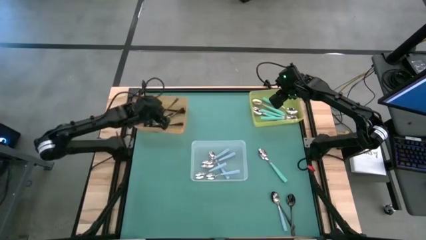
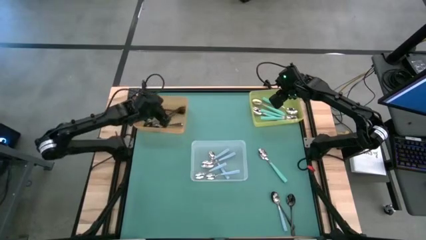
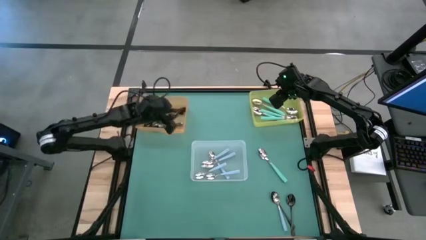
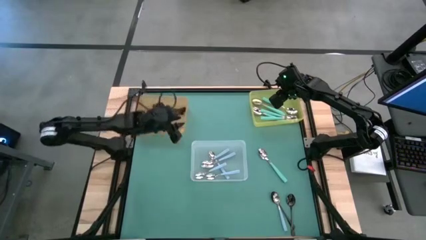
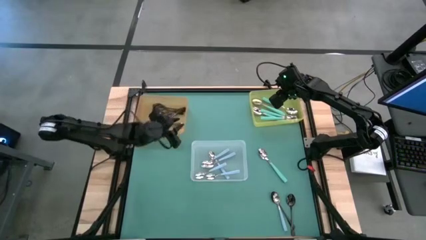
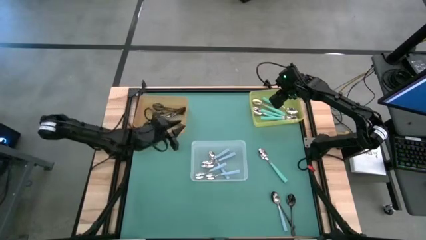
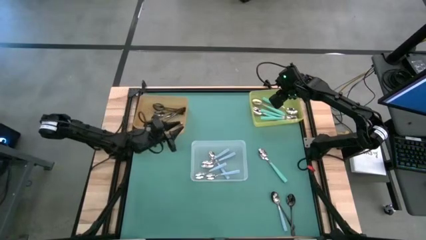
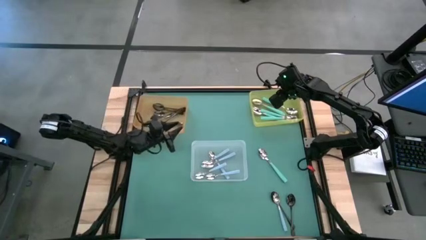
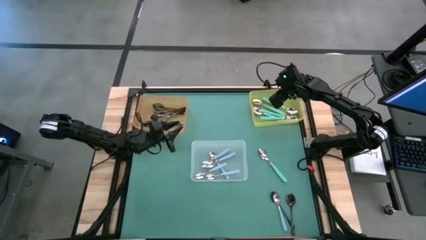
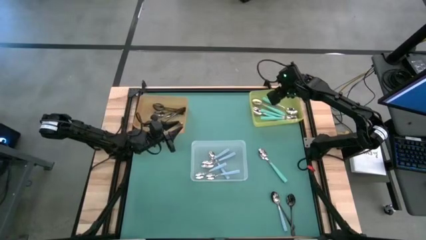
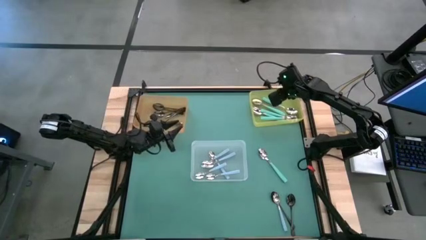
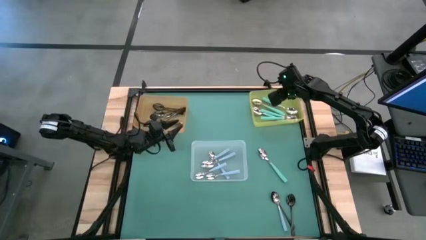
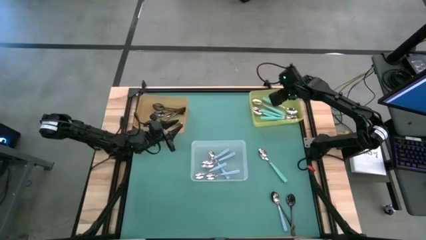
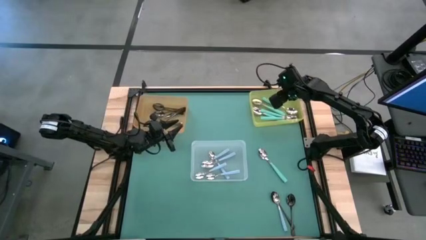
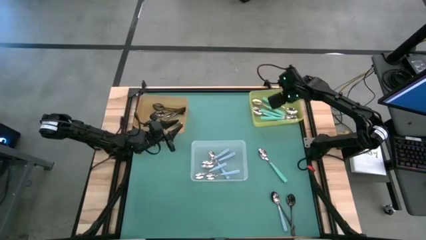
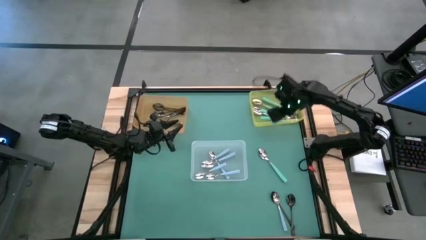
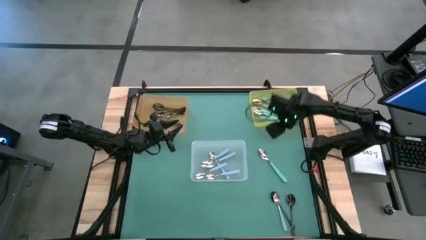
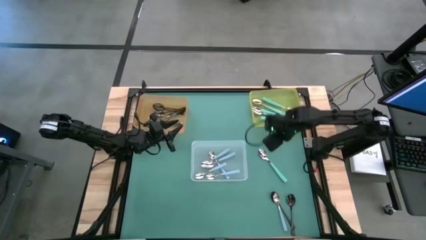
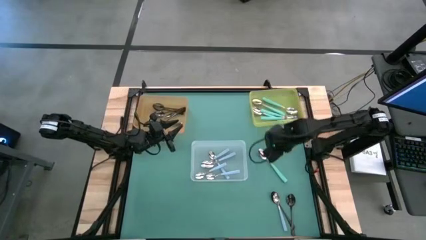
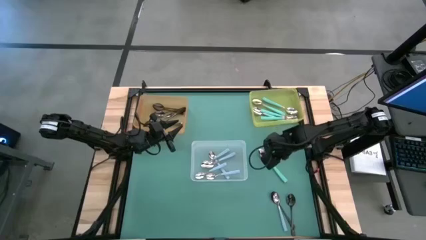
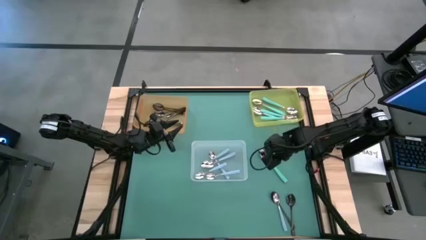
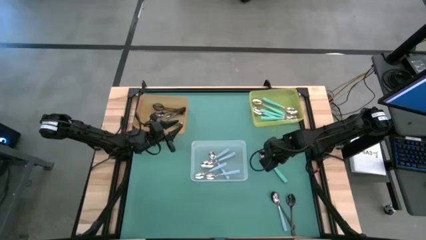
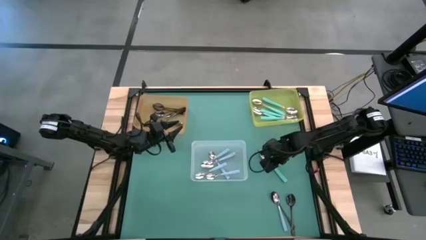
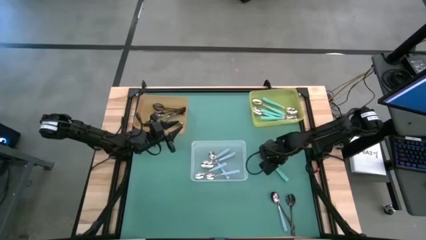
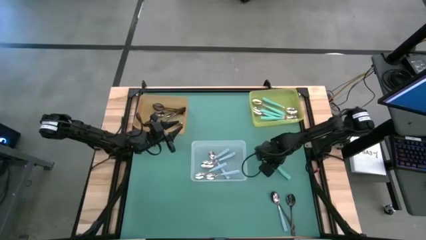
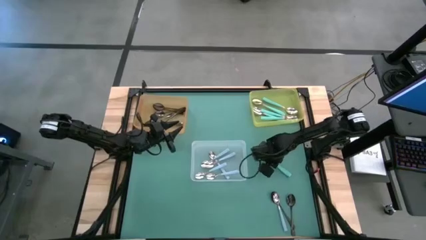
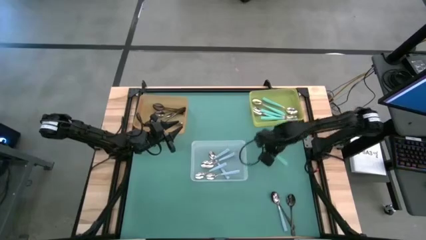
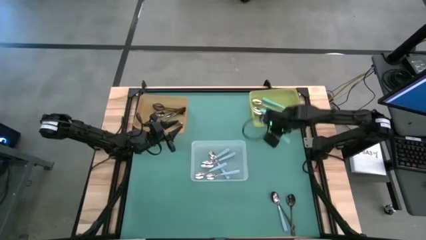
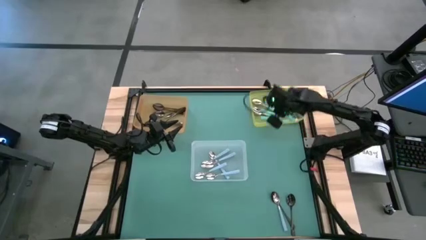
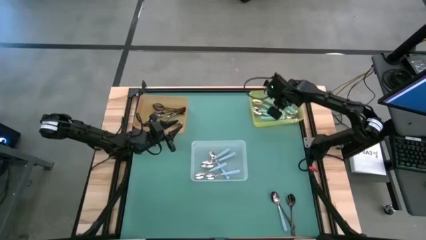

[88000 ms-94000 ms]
Task: Sort silverware by color (type)
Put the light blue spoon into the yellow bin

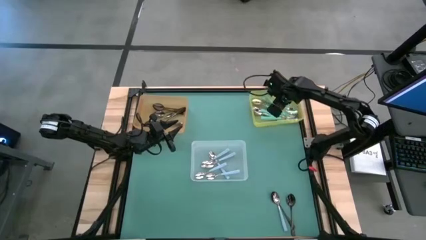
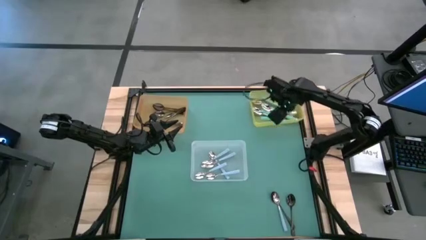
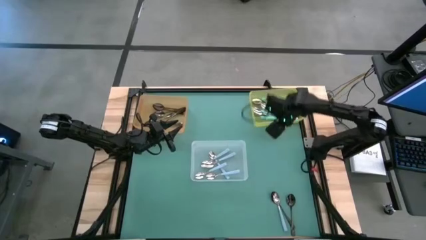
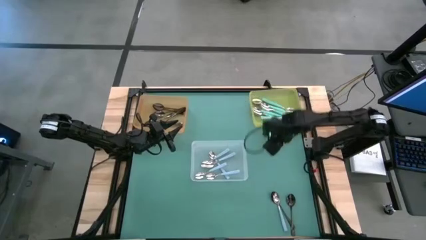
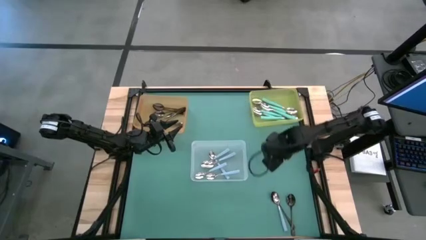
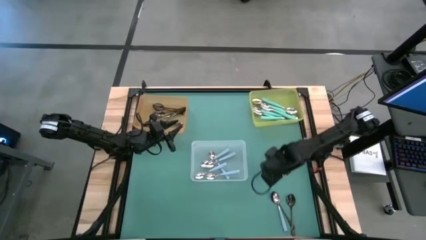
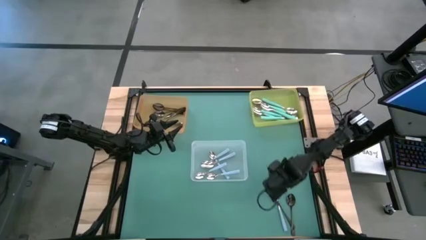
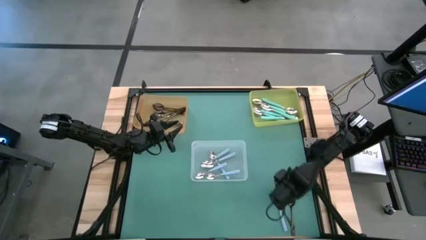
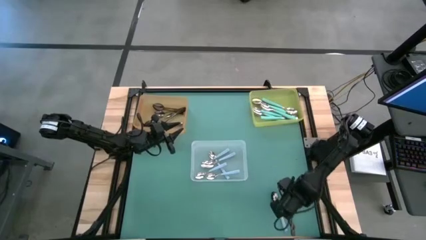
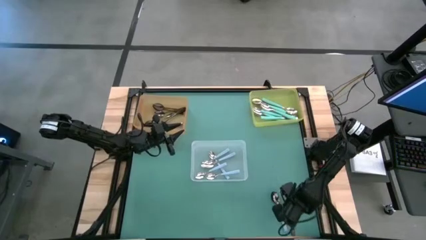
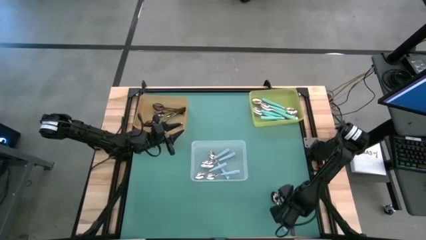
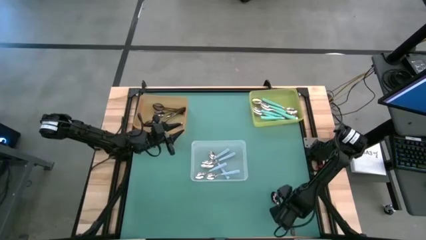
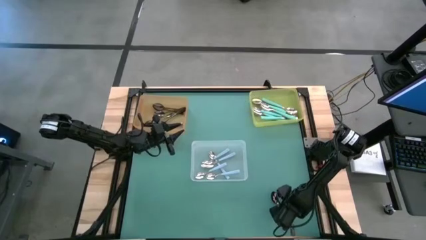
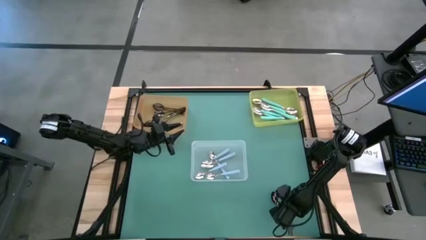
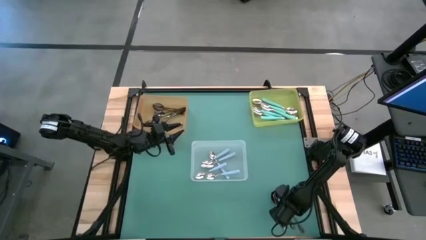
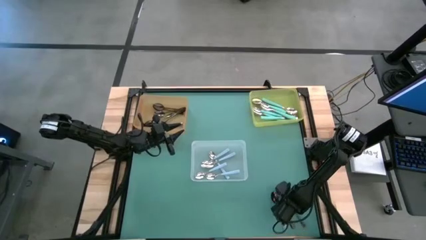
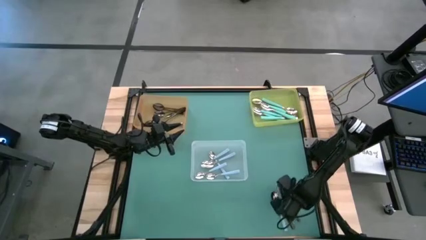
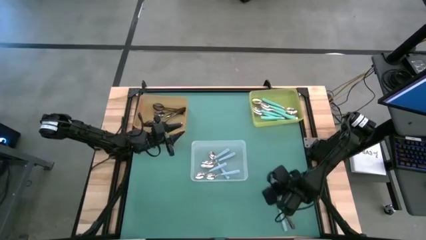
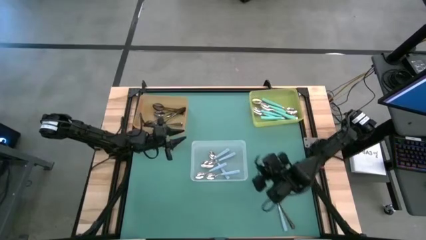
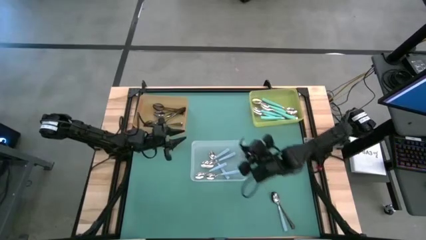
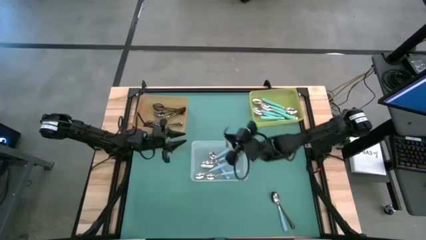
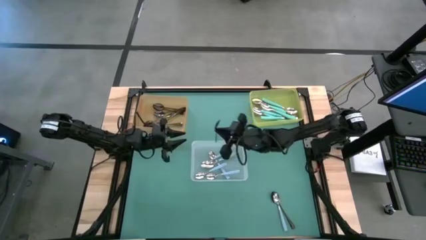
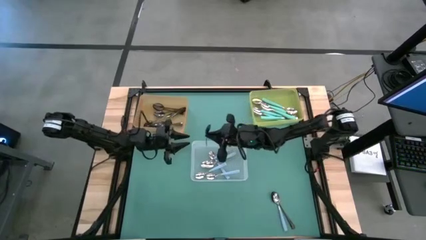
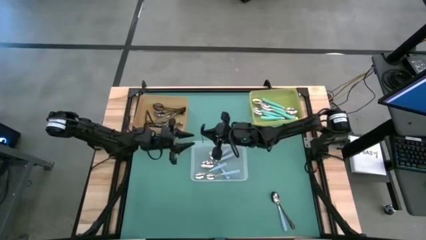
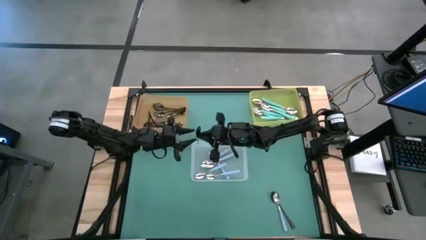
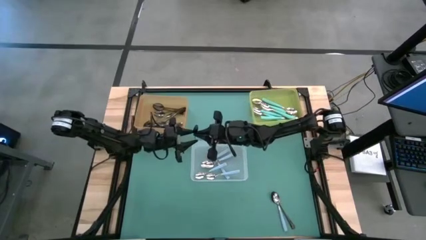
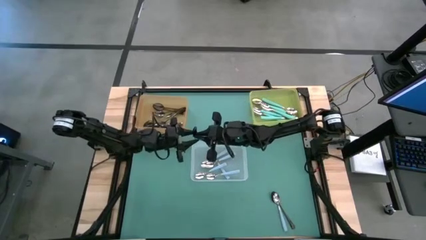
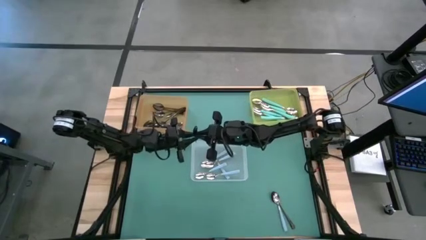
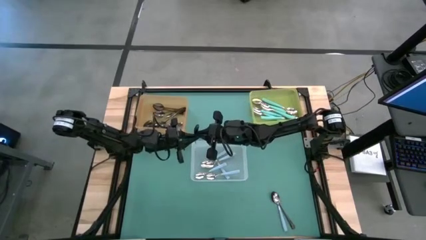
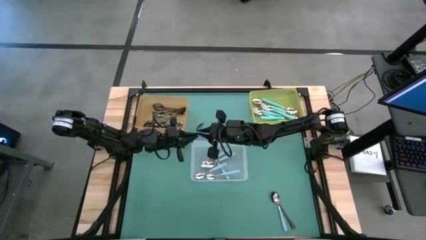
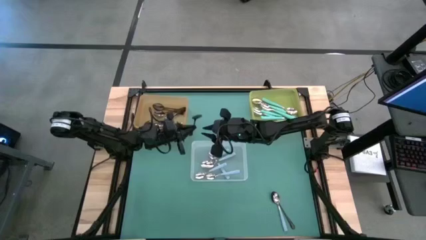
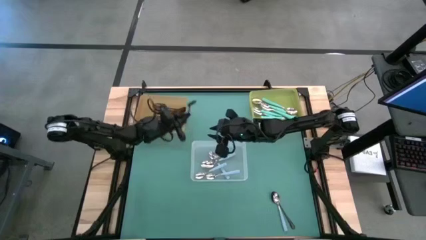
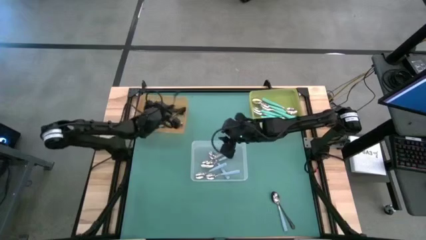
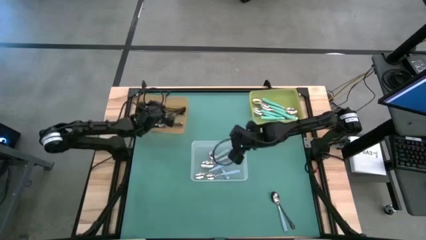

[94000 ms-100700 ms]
Put the black spoon into the orange bin

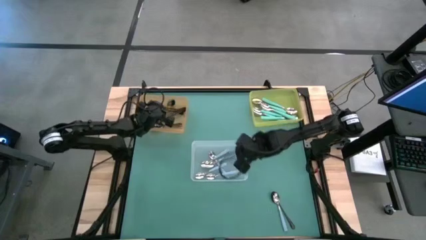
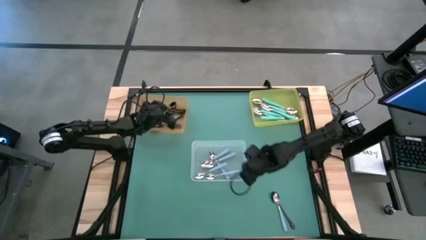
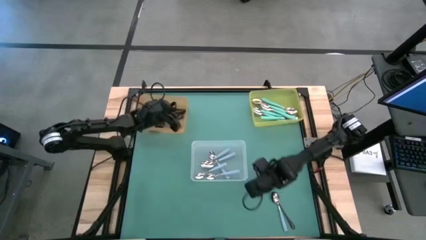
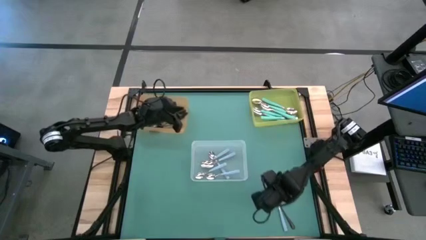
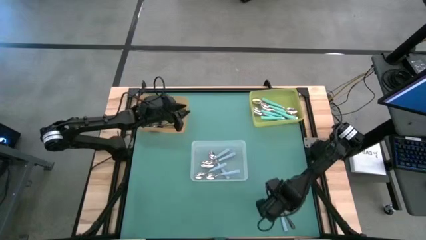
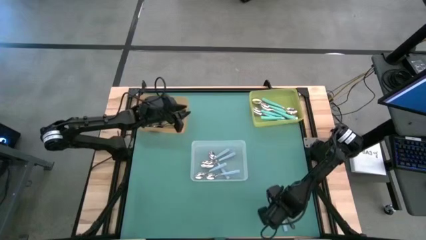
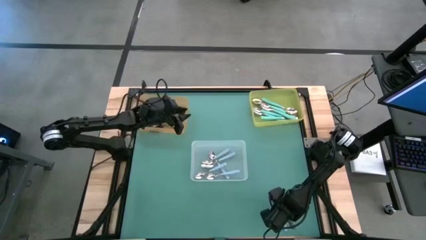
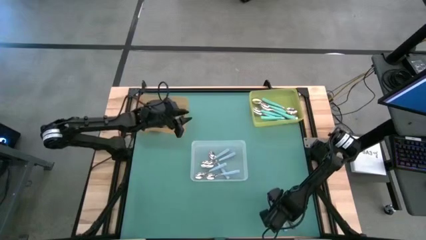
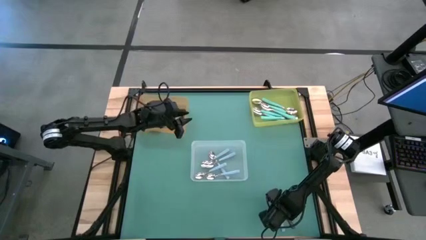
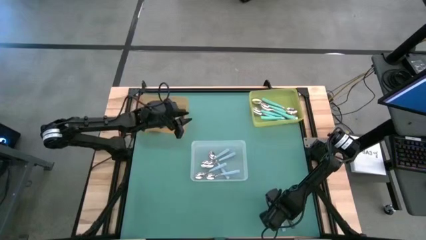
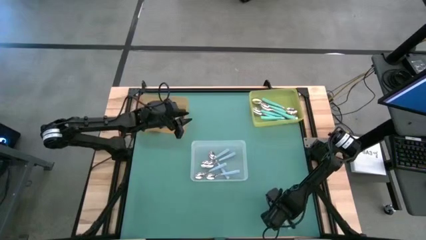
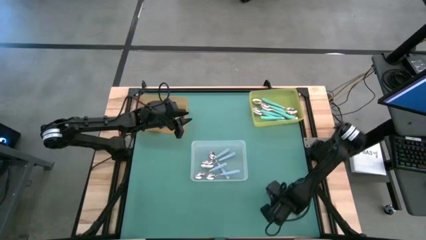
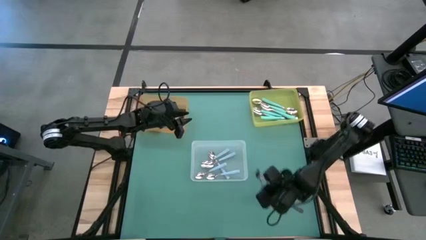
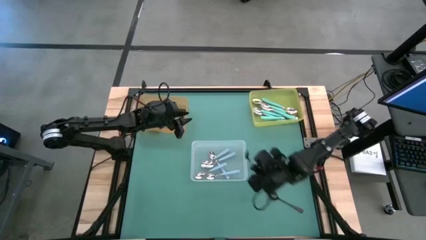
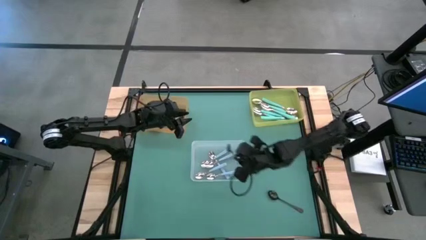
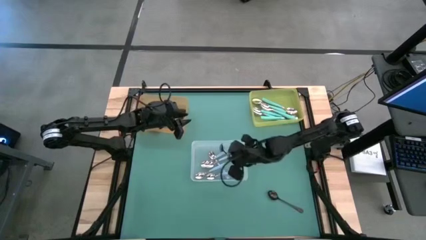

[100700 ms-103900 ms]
Put the blue spoon into the white bin
